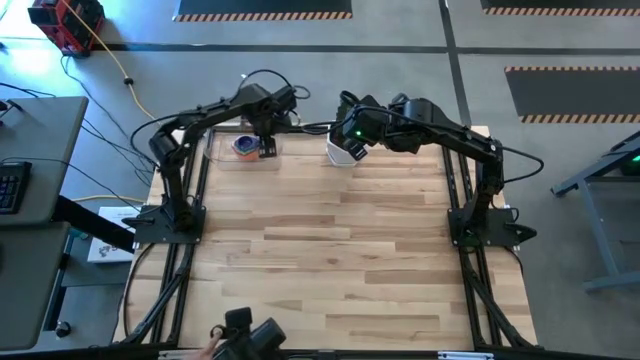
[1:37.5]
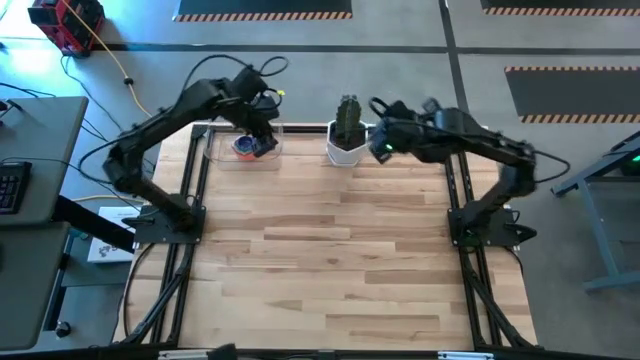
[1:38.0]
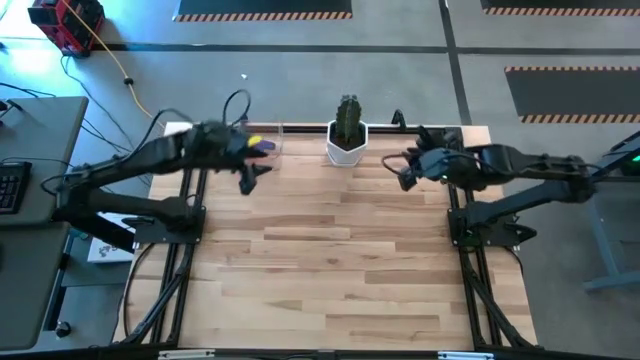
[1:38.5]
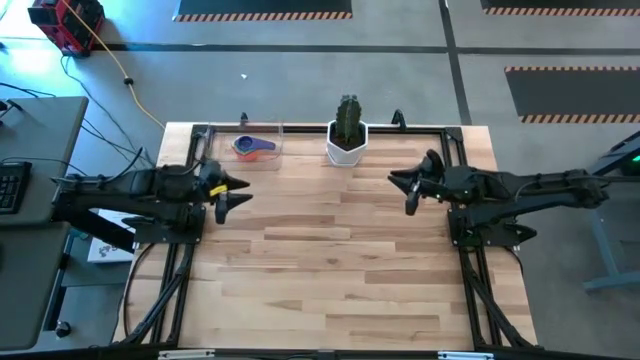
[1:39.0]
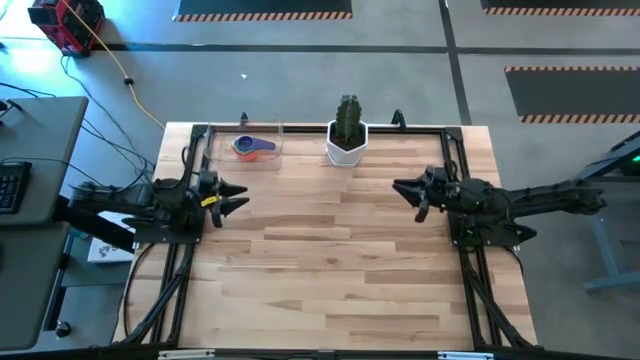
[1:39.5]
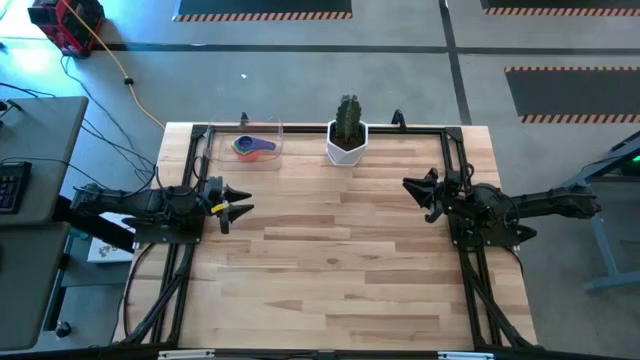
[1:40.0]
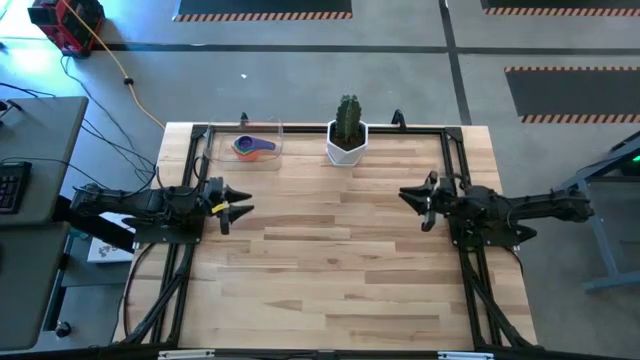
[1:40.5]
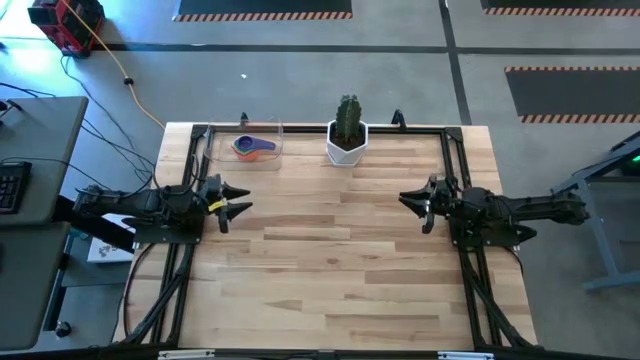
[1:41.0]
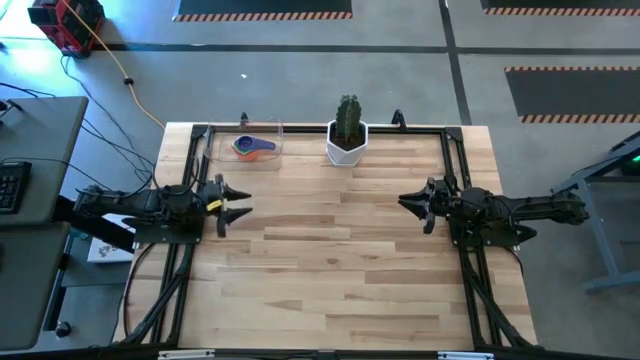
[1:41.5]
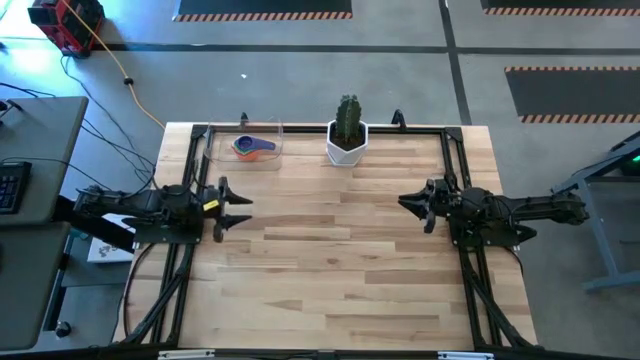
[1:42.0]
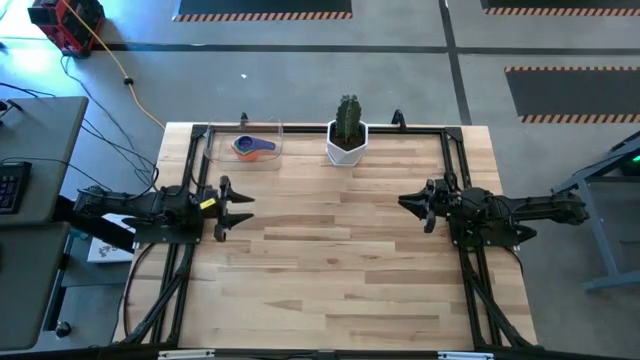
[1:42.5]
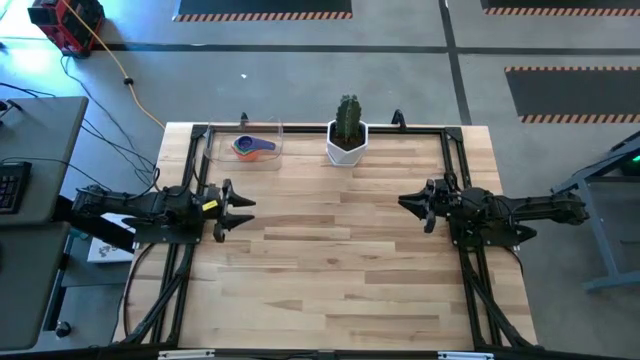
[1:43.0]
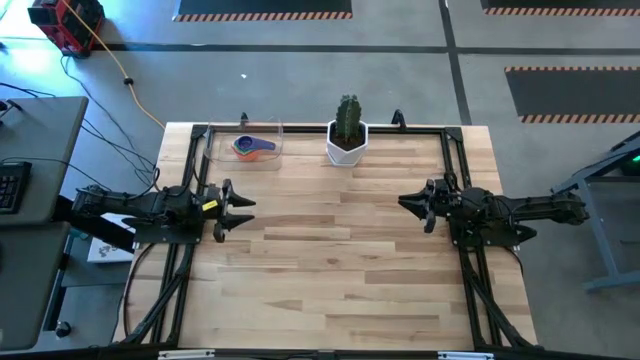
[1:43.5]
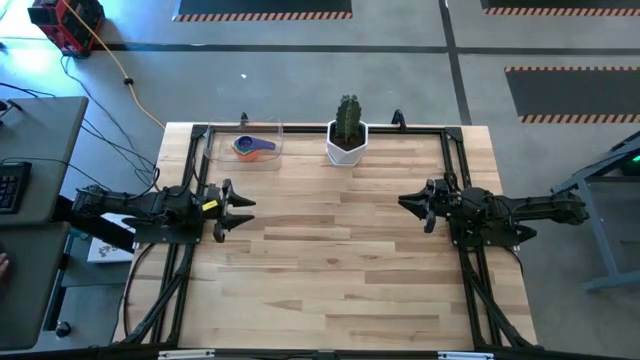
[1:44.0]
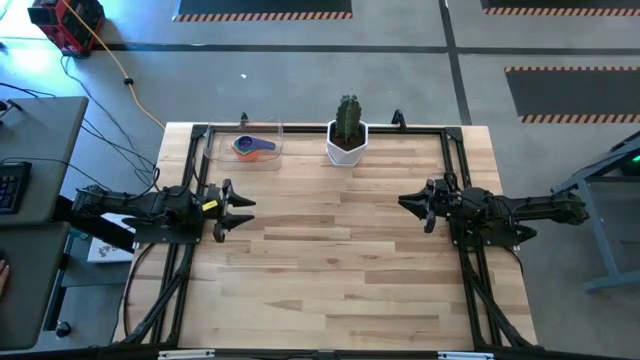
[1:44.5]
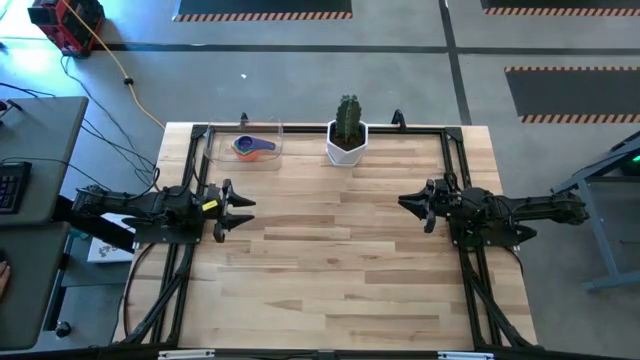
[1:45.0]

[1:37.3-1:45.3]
Task: Nest measuring cups in basket
Return to Home Position

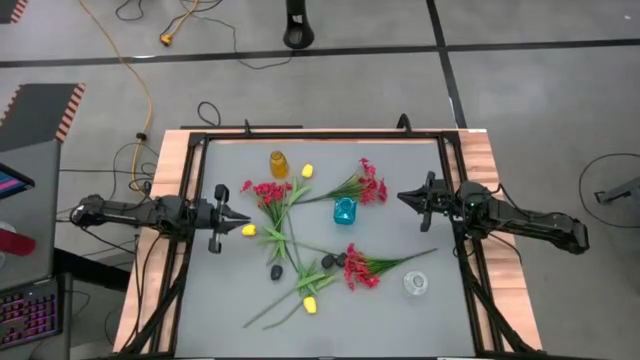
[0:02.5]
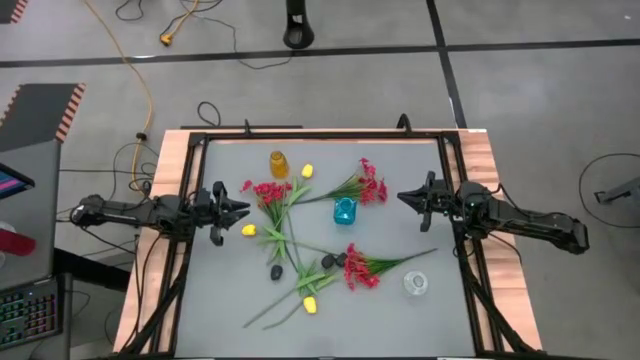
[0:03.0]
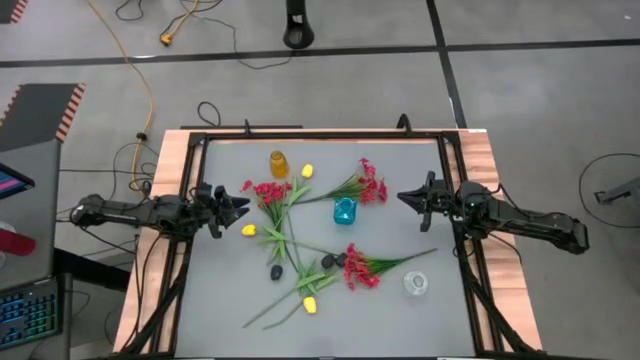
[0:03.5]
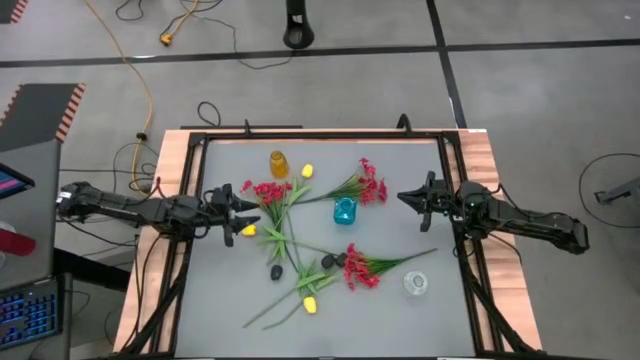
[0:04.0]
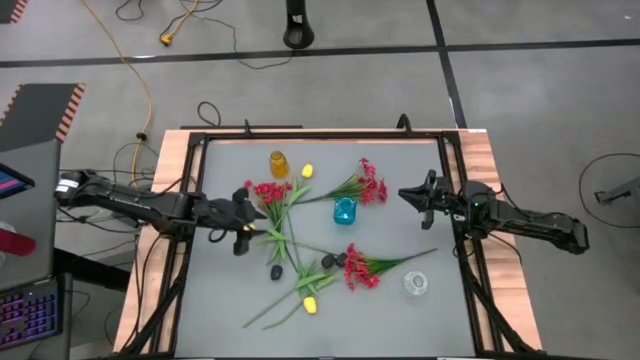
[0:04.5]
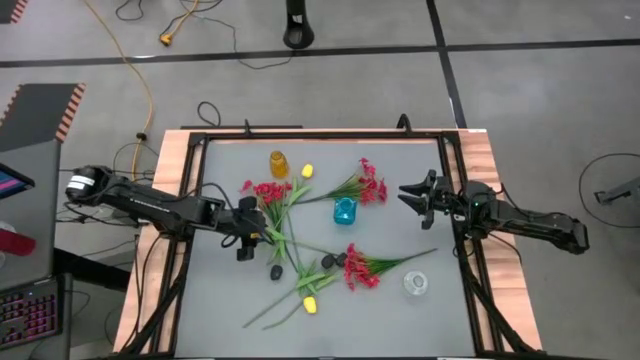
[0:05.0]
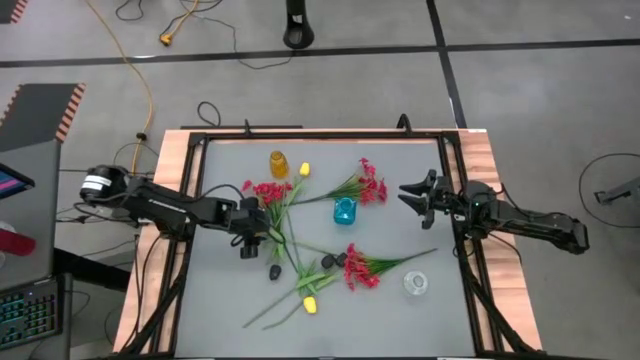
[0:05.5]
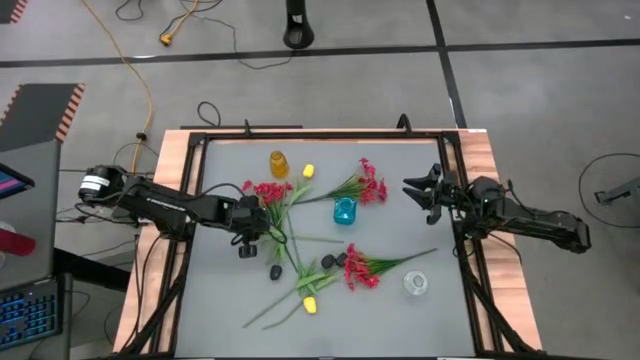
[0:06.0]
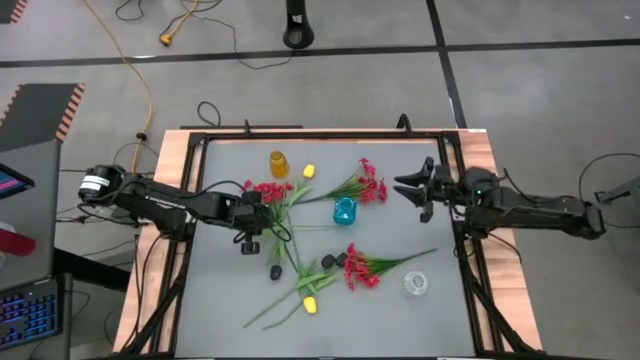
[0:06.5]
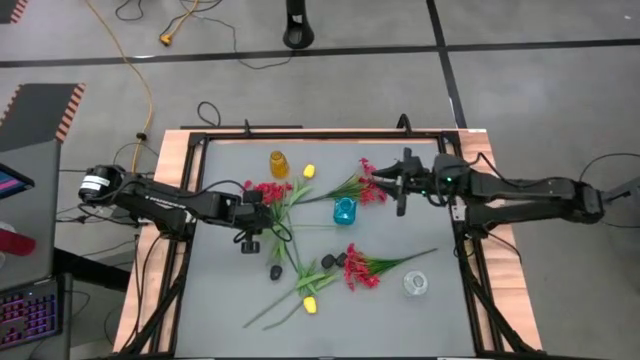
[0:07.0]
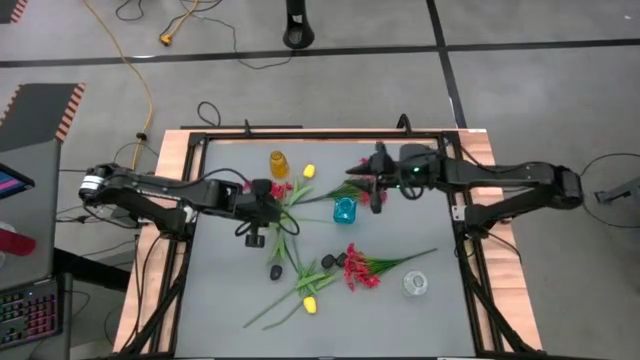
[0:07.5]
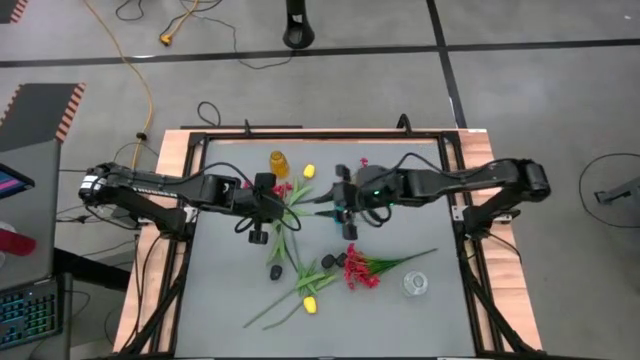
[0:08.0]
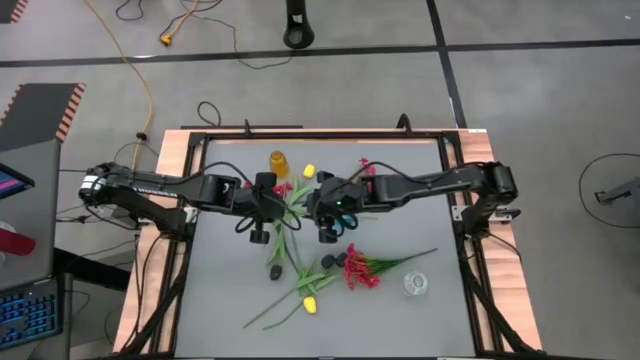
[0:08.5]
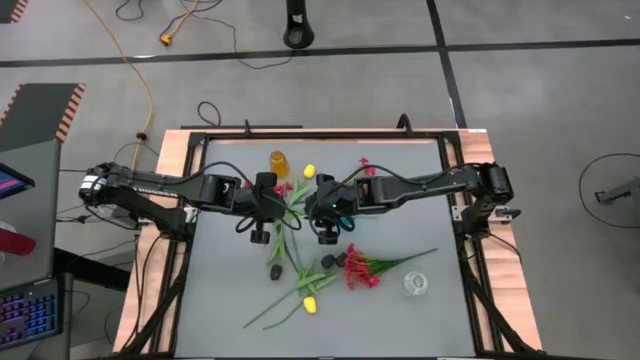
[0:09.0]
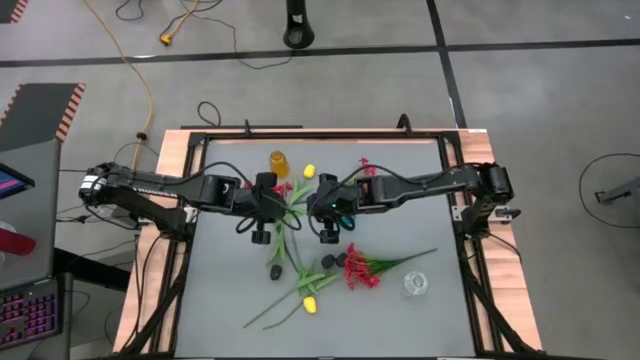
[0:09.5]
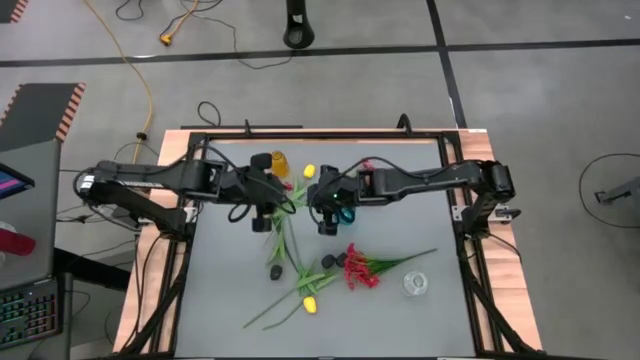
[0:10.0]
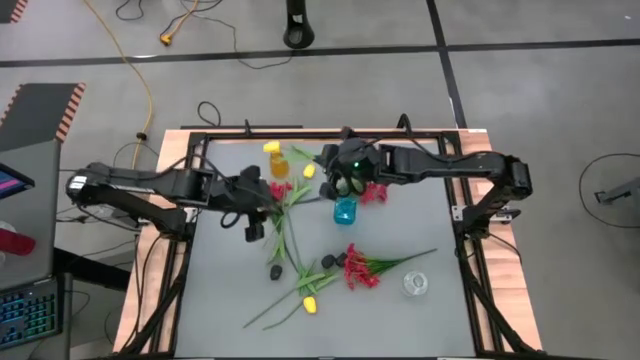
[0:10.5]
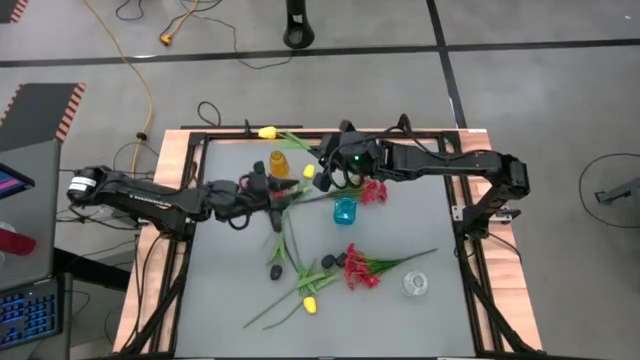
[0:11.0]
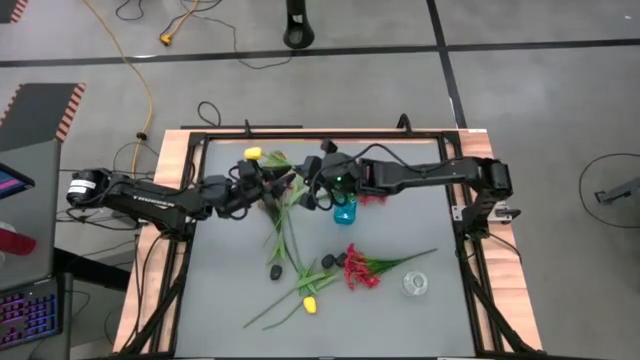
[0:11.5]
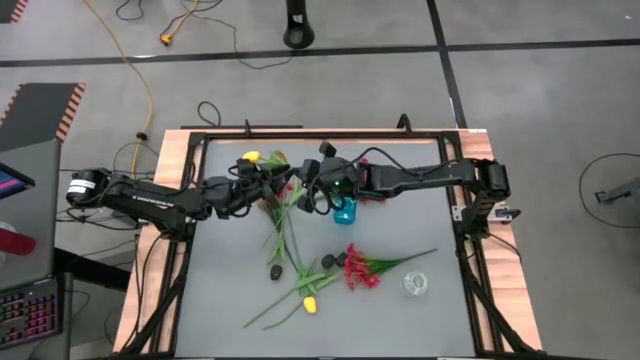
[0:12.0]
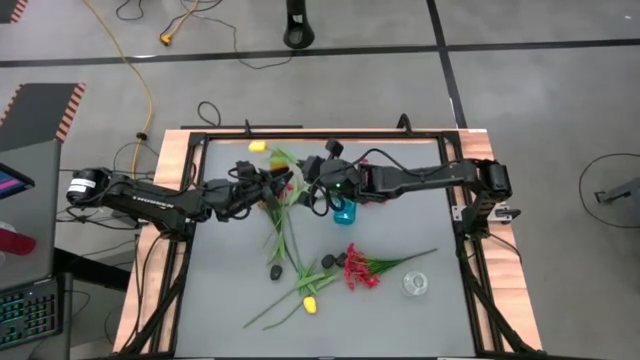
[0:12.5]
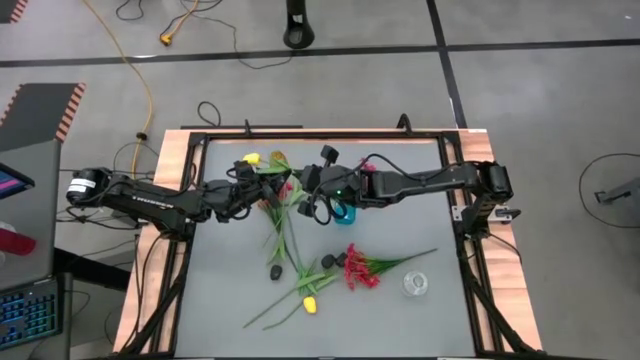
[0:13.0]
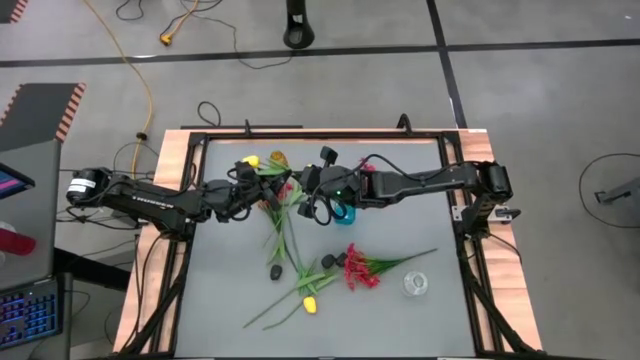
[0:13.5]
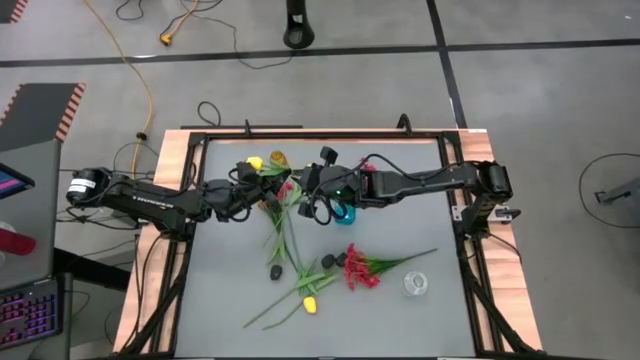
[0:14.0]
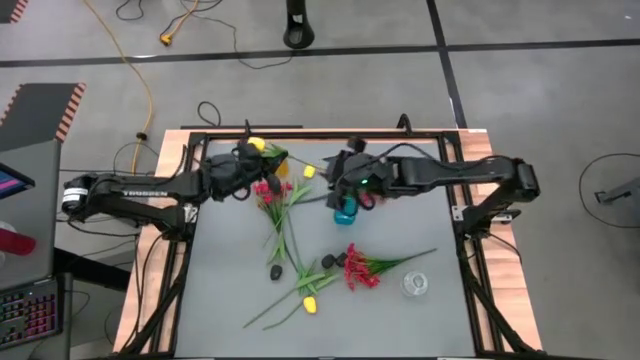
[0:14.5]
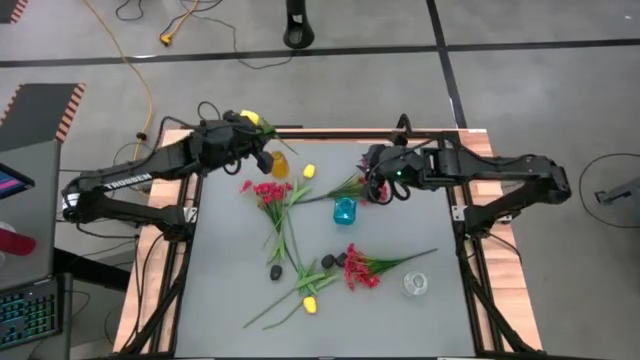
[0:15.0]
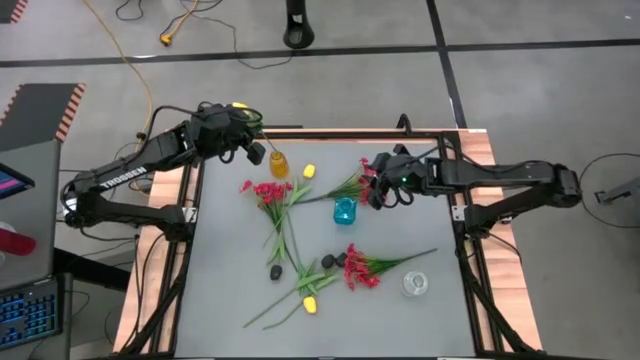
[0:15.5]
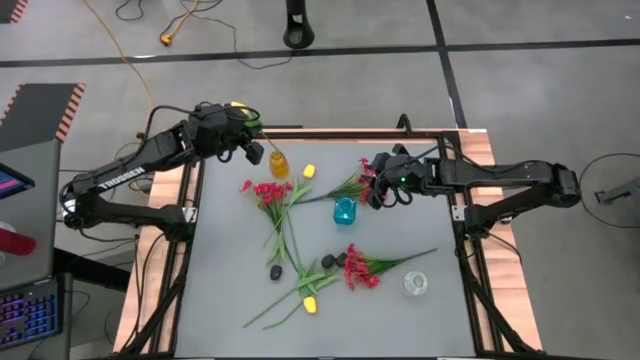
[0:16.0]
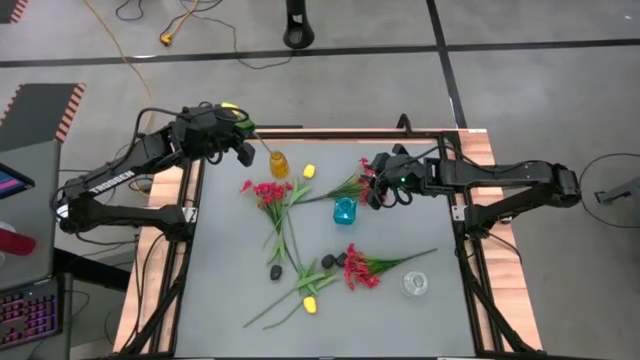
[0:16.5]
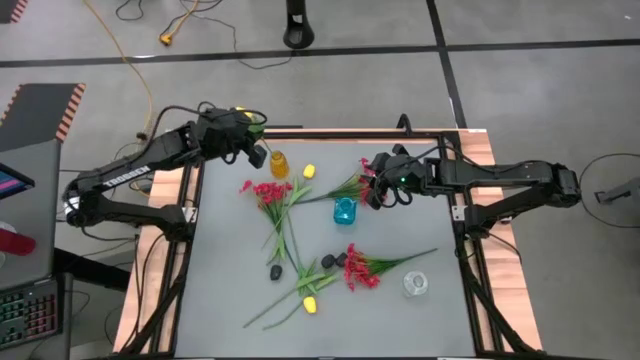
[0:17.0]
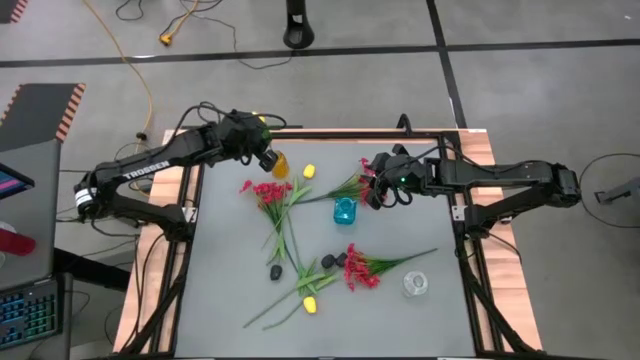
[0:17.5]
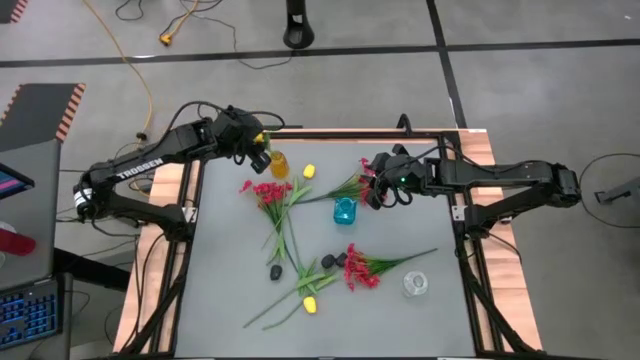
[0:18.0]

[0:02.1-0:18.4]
Task: Sort flowers into vase by color
Put the middle yellow flower into the yellow vase
